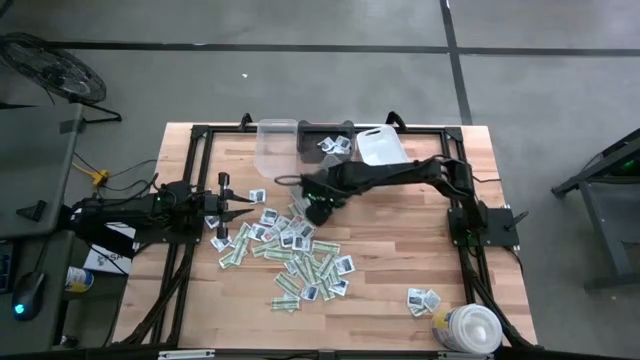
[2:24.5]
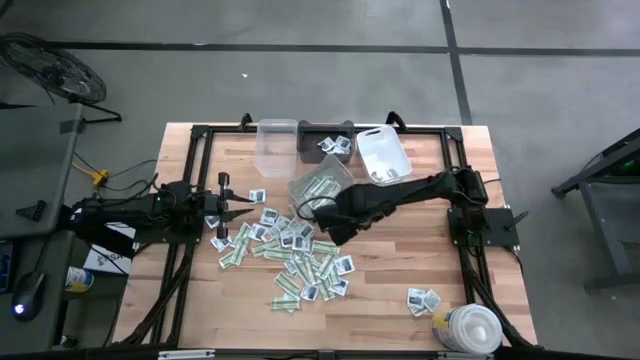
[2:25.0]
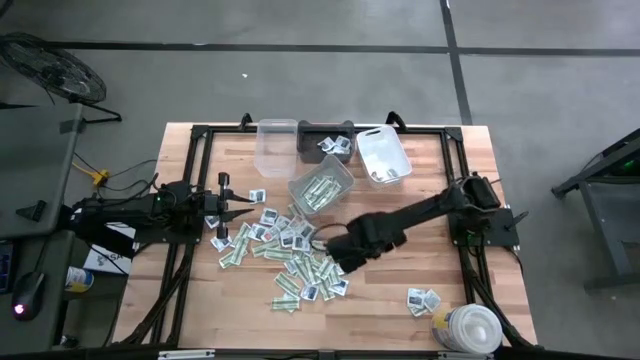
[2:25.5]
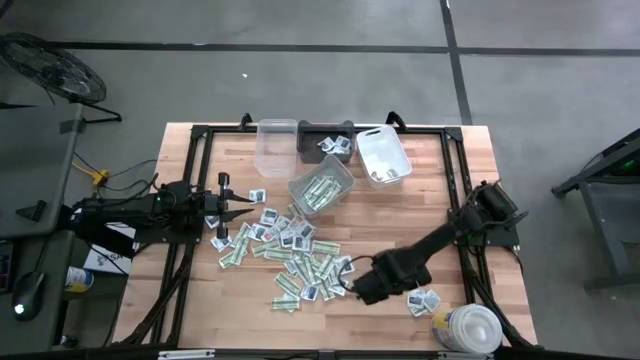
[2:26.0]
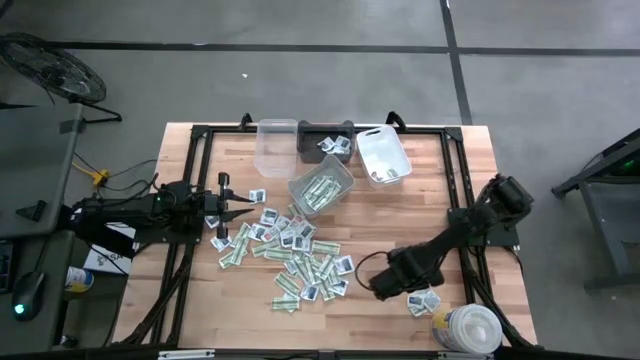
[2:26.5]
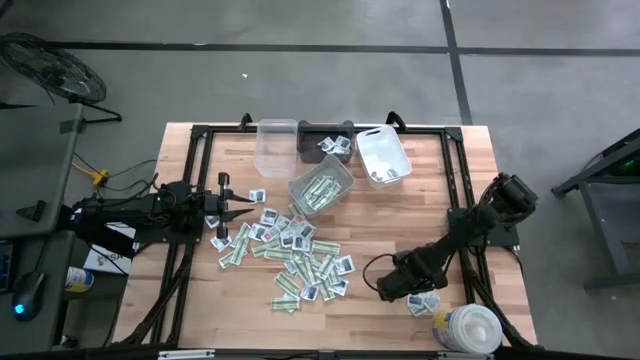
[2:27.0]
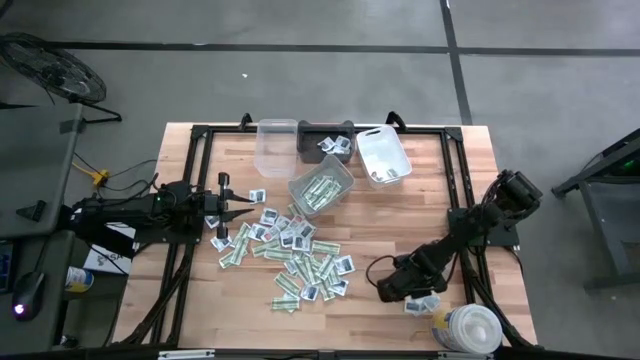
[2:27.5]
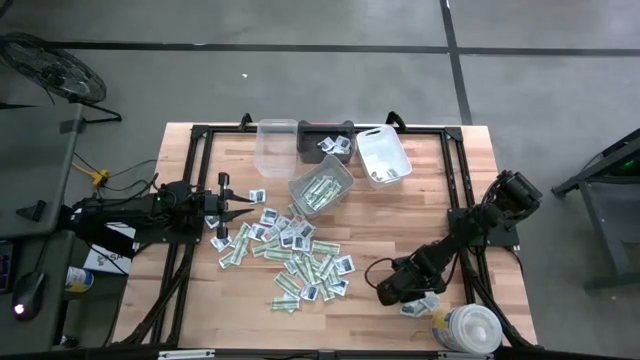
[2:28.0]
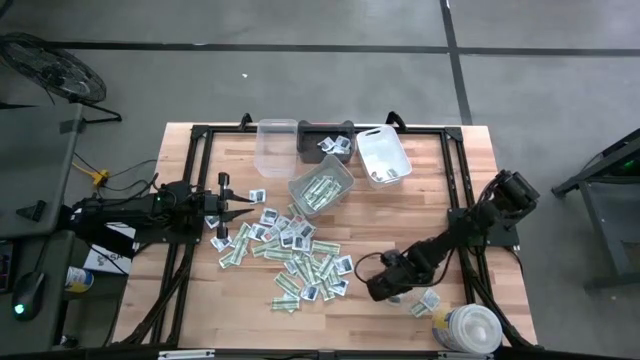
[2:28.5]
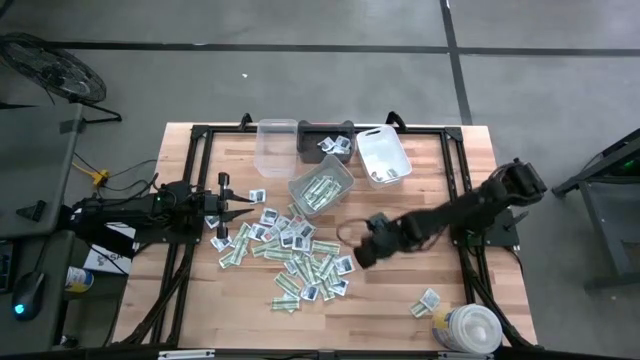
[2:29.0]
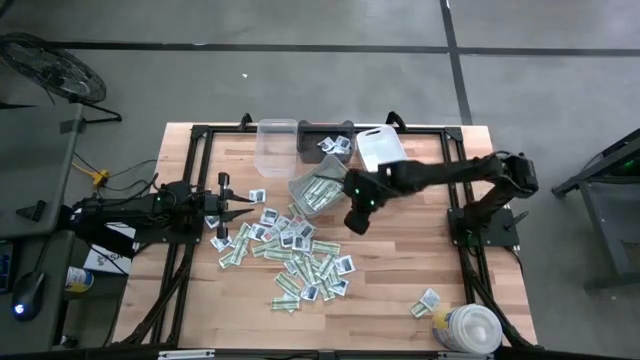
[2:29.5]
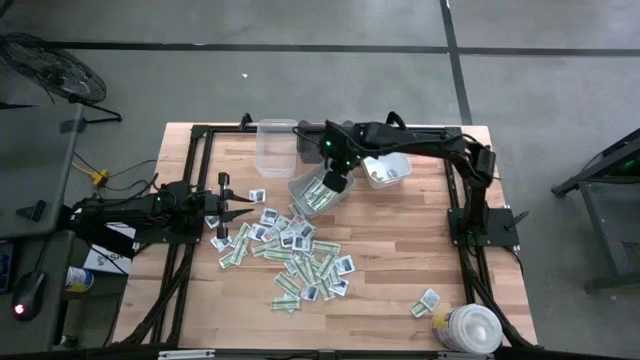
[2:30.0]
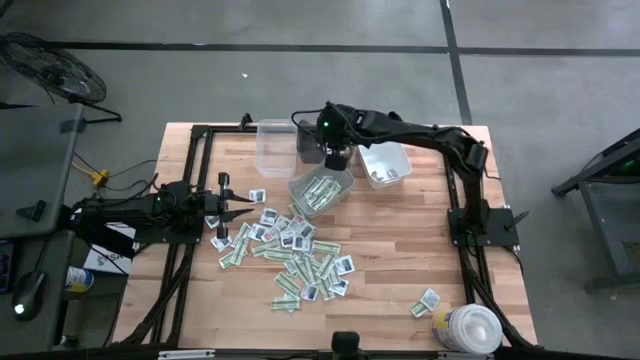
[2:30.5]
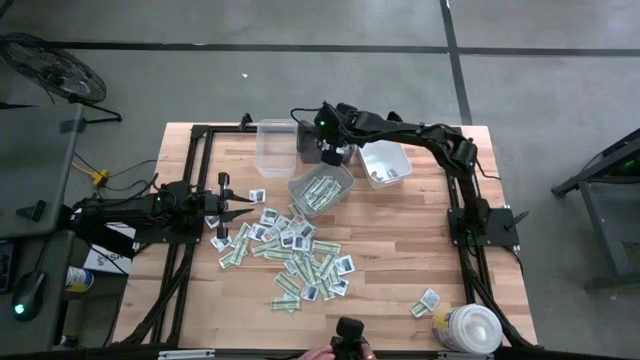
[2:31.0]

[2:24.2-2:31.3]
Task: Pick & Place First Aid Supplies
Put the towelette pack into the black bin

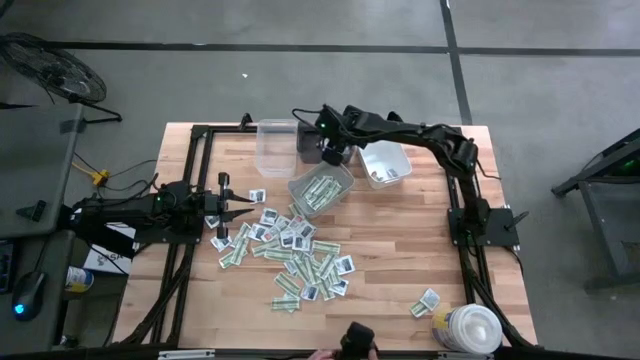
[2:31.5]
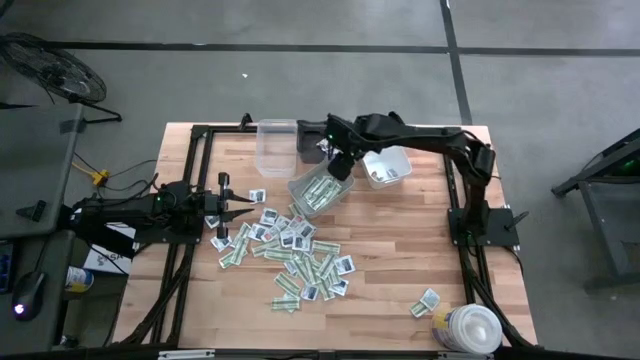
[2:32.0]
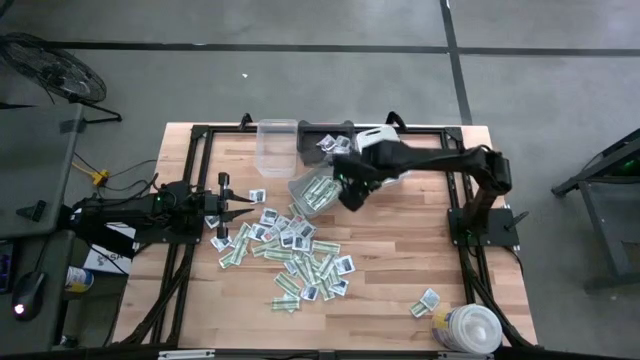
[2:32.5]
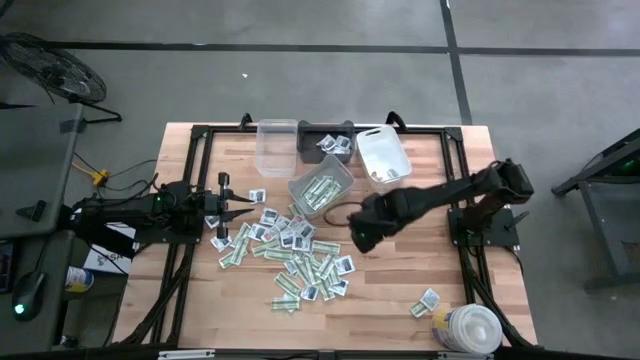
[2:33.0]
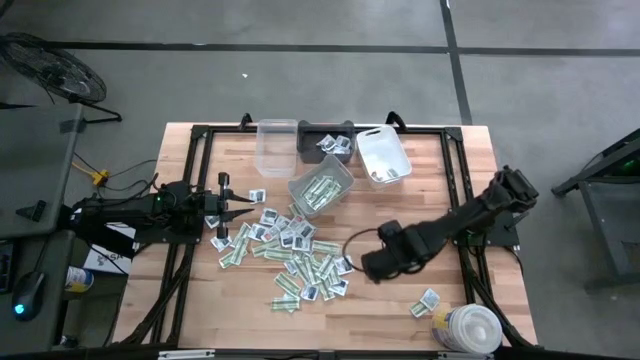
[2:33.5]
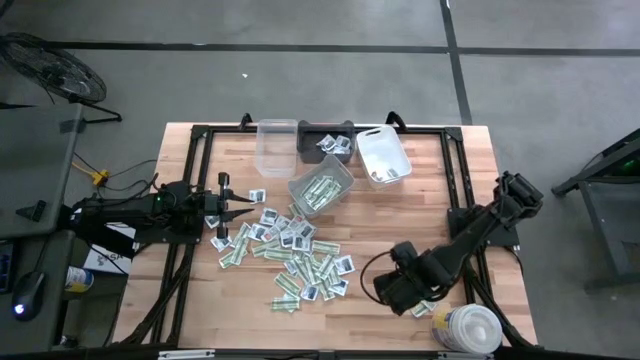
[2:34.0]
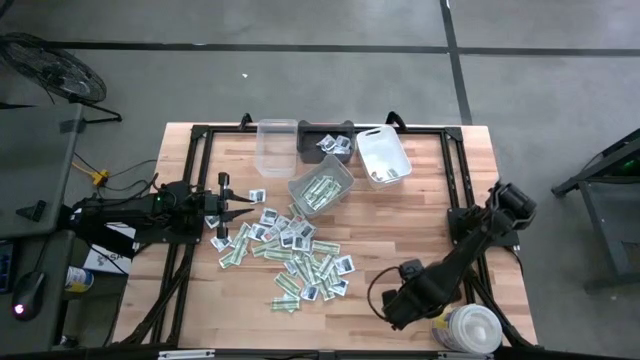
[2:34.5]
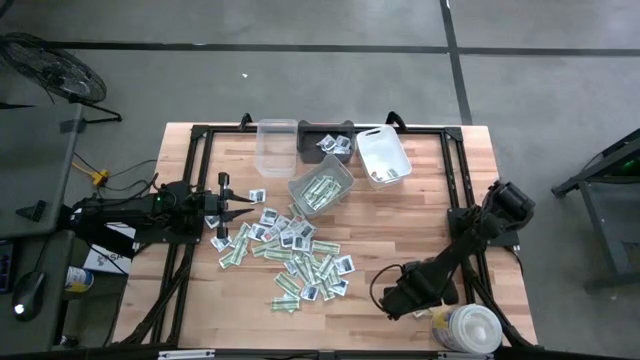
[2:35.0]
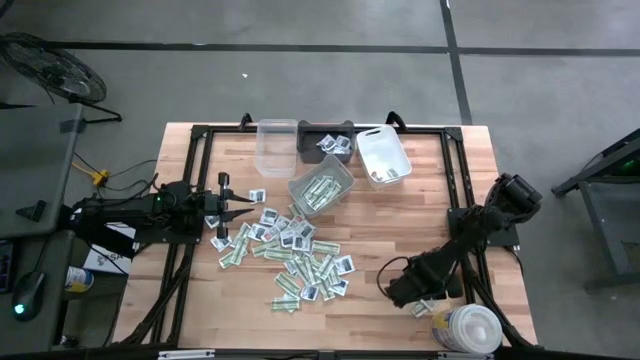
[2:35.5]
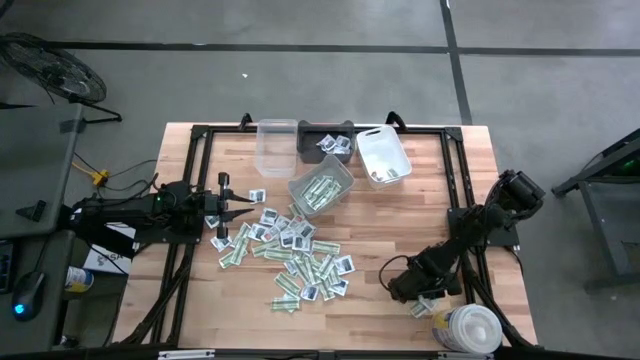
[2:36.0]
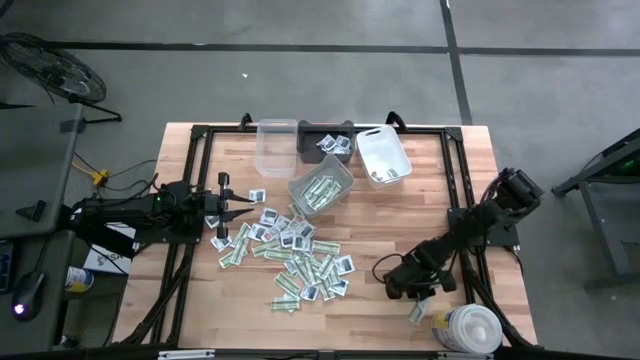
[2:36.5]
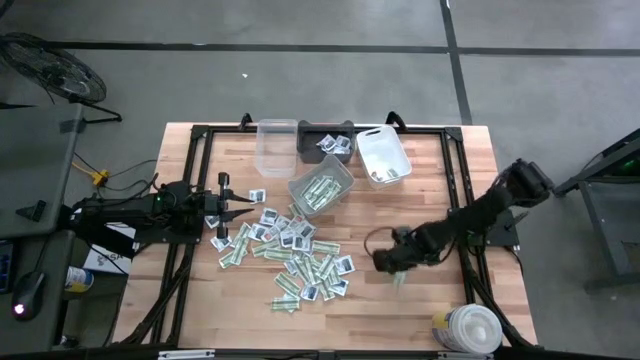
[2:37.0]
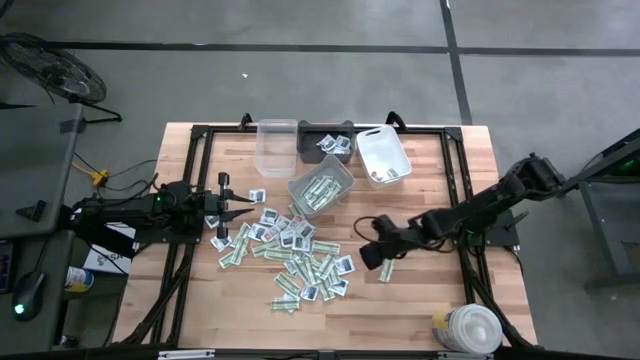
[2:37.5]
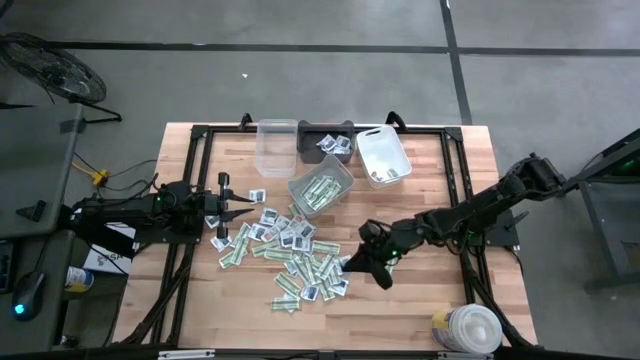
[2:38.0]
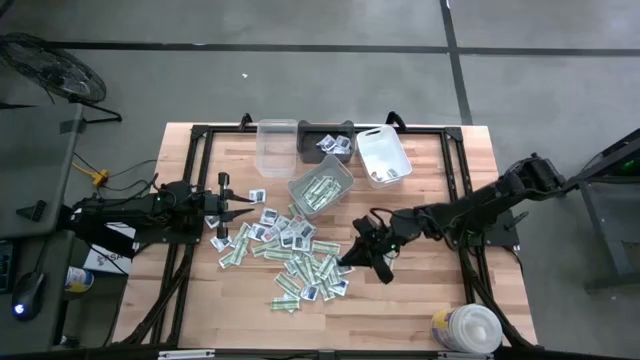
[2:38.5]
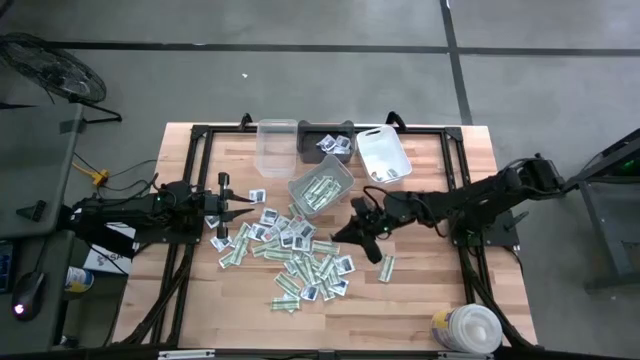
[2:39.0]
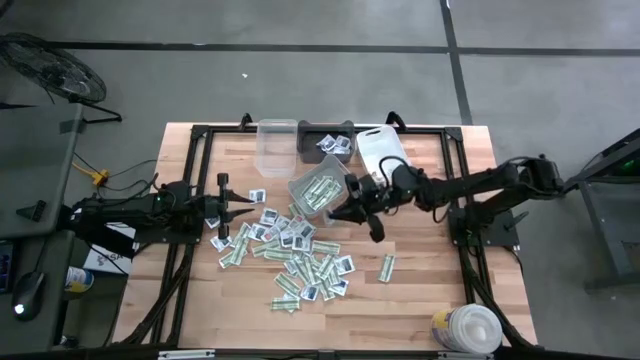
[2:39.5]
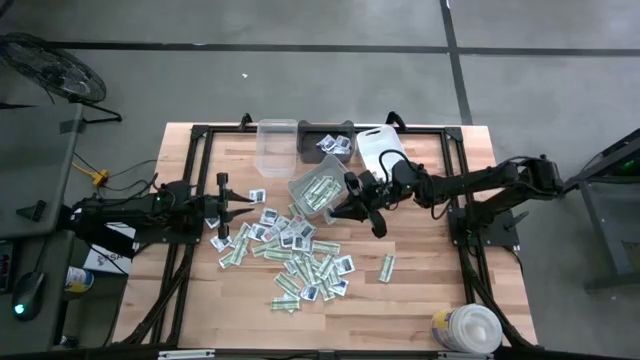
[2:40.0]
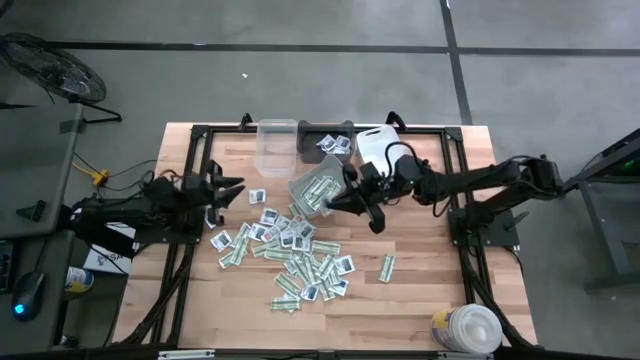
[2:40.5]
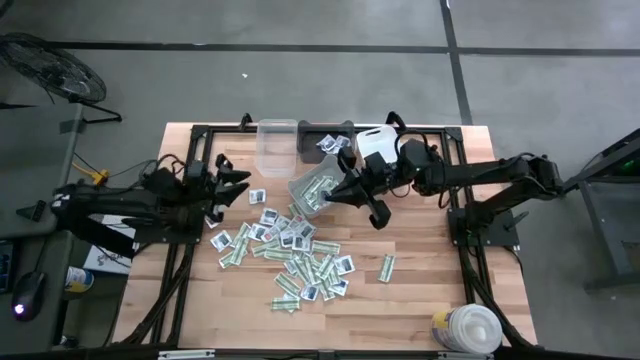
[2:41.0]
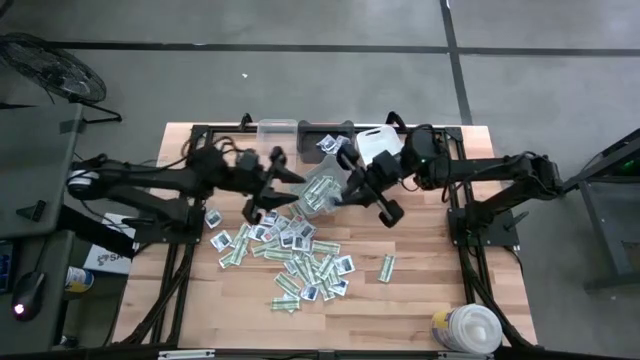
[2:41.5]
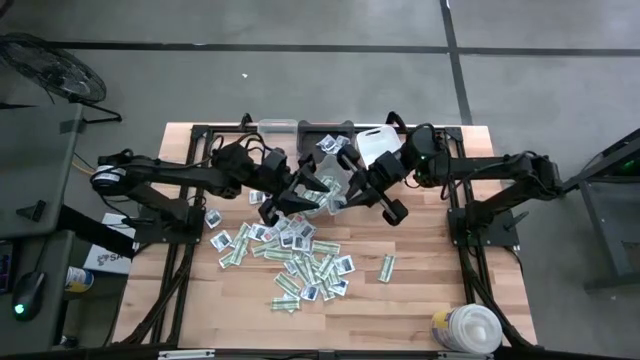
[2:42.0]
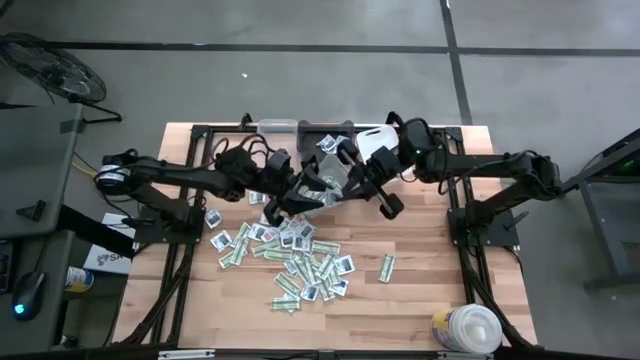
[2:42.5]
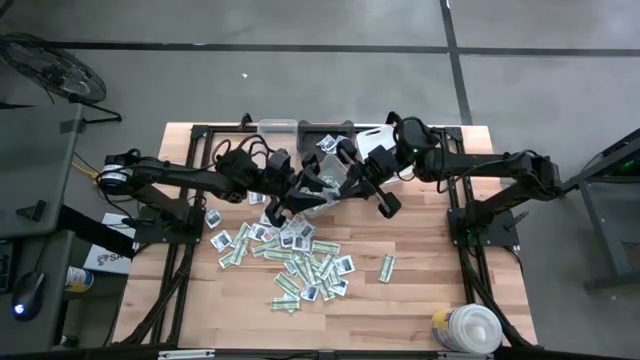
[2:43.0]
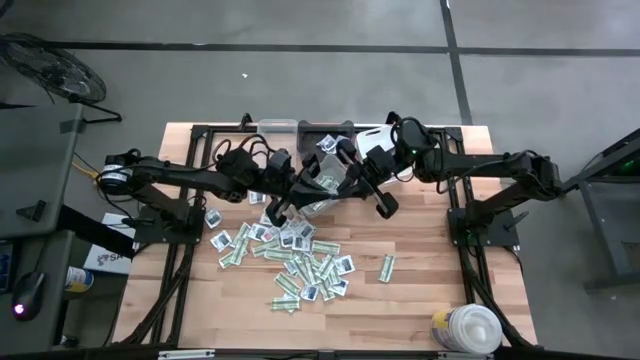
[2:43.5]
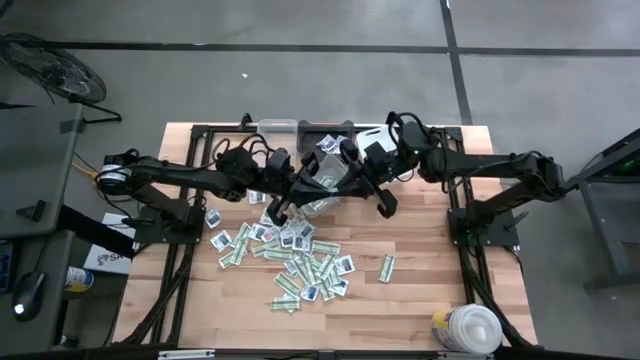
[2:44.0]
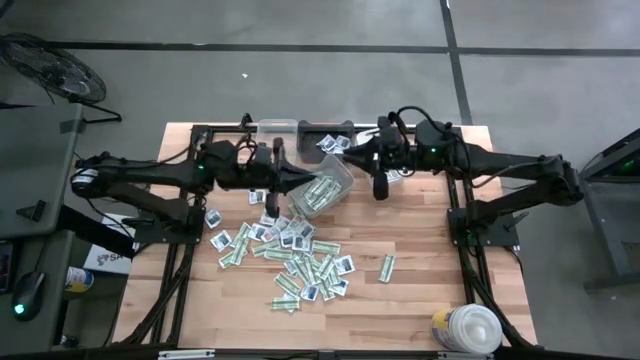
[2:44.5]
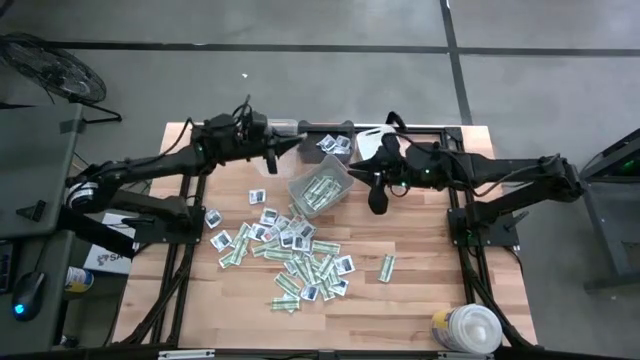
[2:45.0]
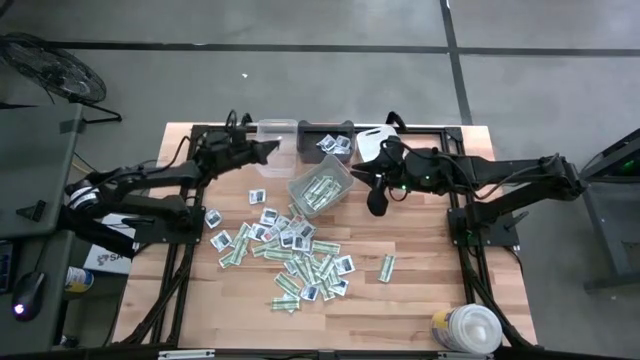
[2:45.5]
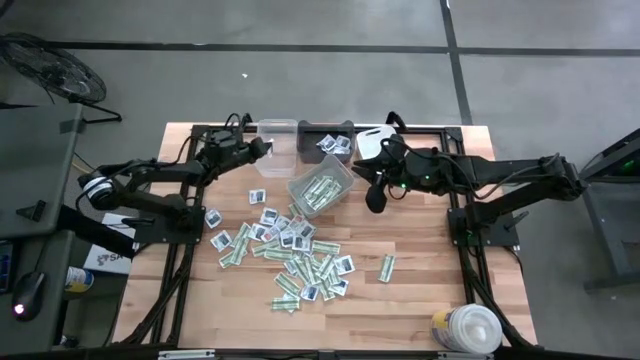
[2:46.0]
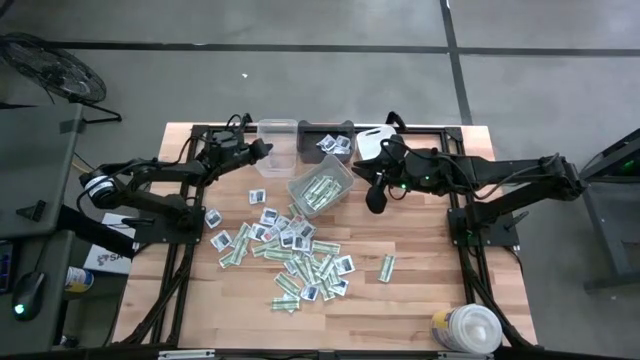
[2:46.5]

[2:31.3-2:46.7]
Put the alcohol pad into the transparent bin
